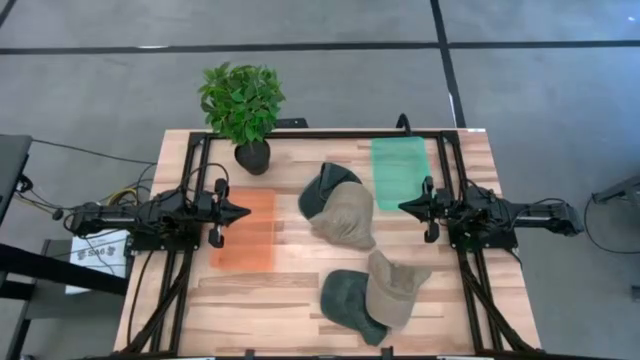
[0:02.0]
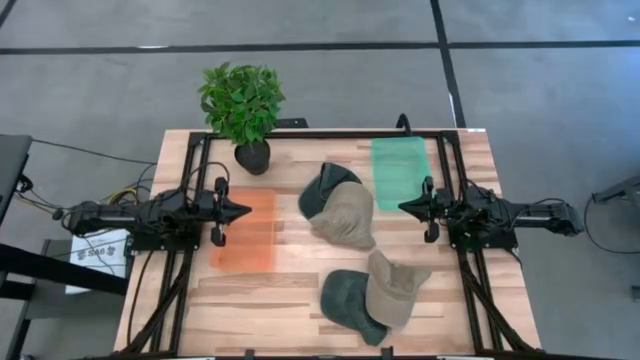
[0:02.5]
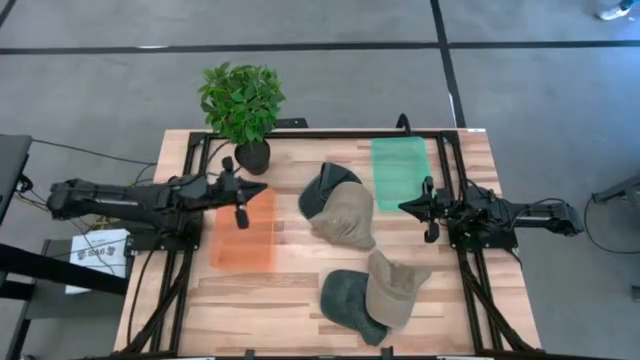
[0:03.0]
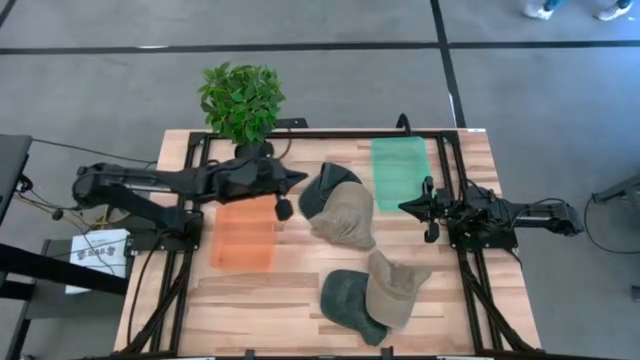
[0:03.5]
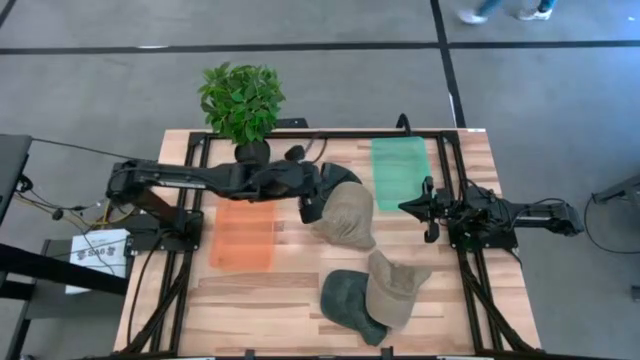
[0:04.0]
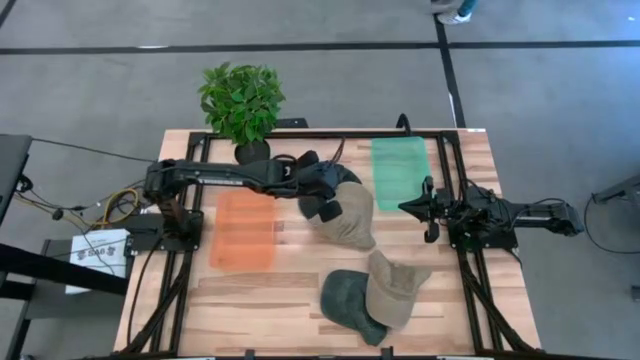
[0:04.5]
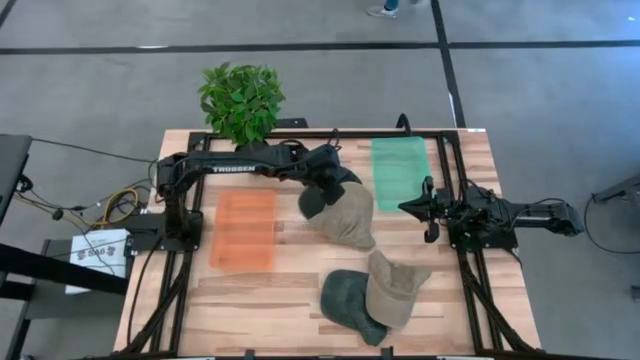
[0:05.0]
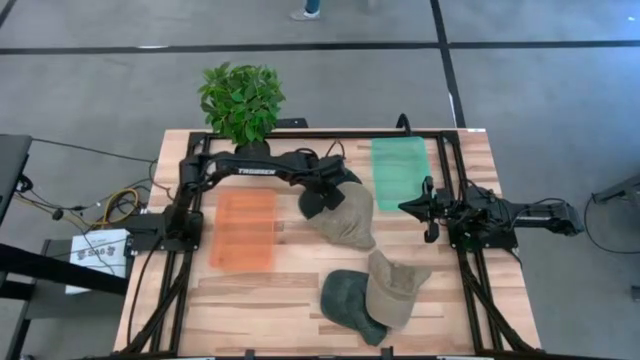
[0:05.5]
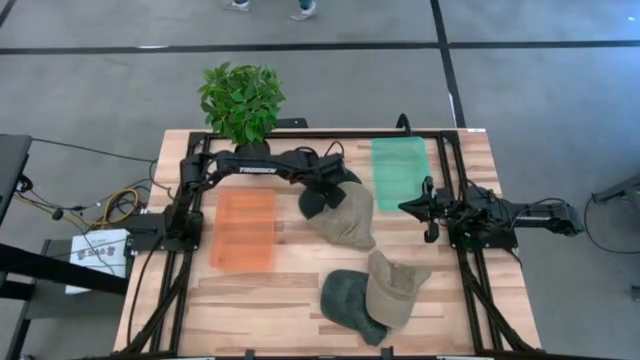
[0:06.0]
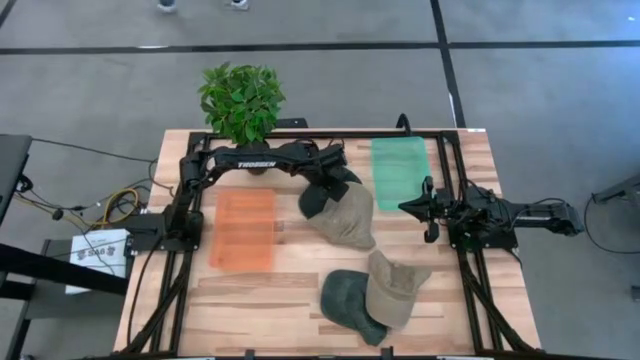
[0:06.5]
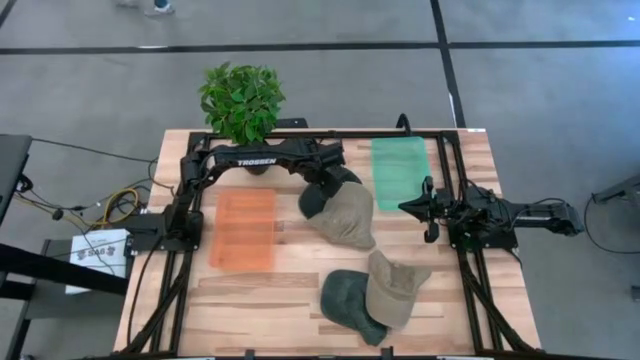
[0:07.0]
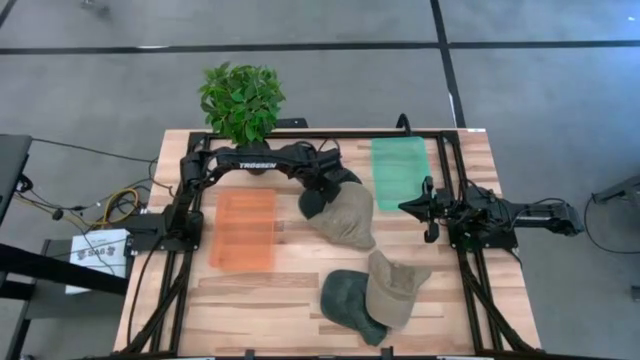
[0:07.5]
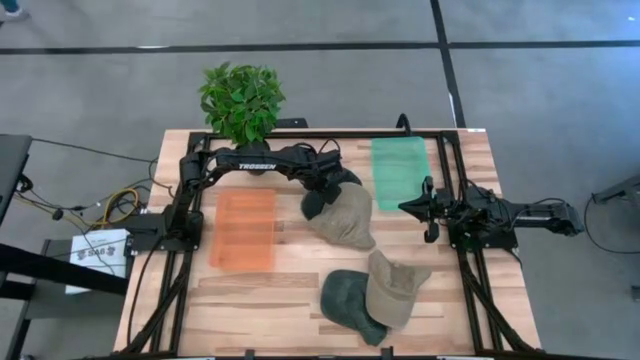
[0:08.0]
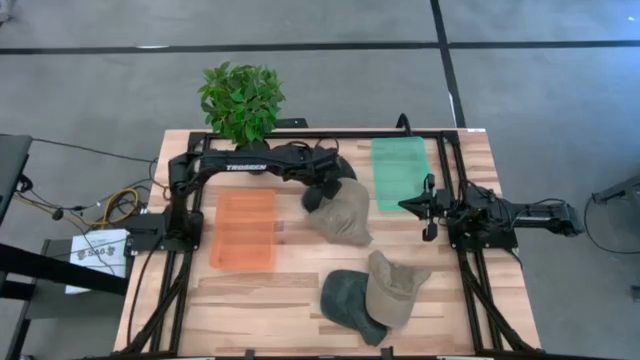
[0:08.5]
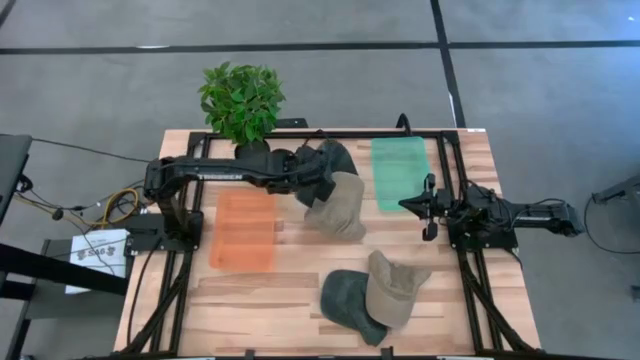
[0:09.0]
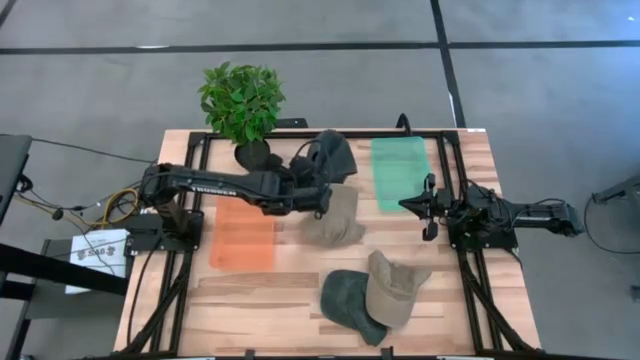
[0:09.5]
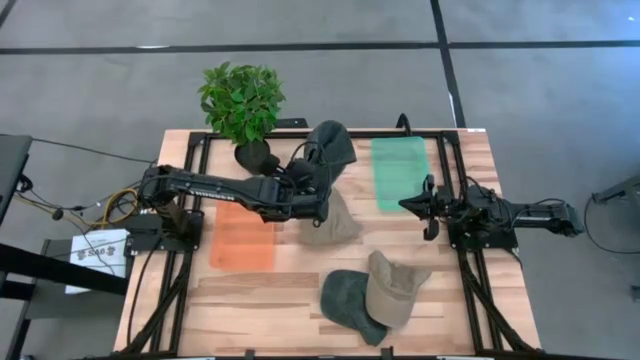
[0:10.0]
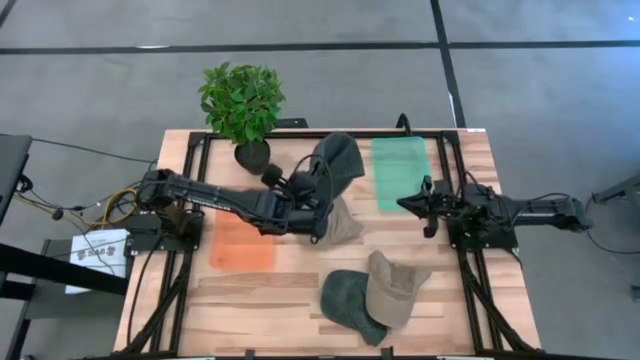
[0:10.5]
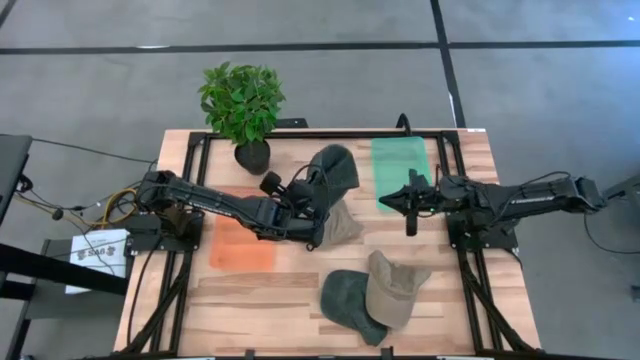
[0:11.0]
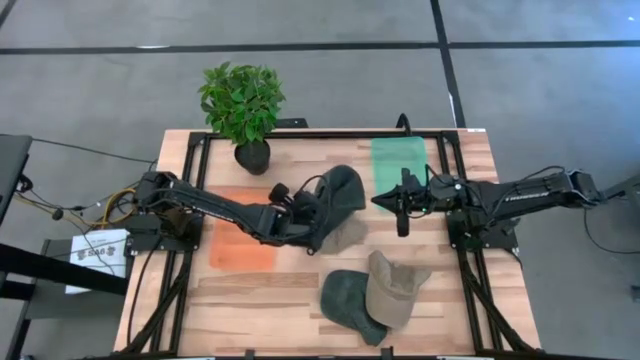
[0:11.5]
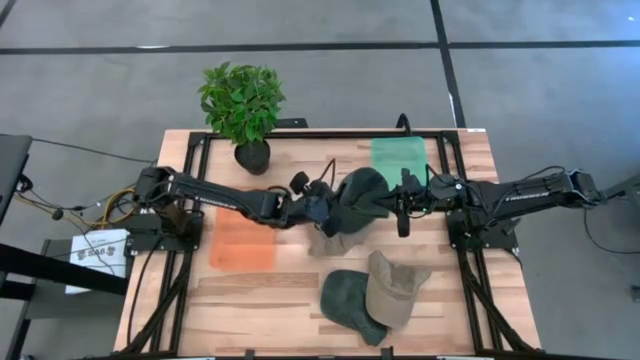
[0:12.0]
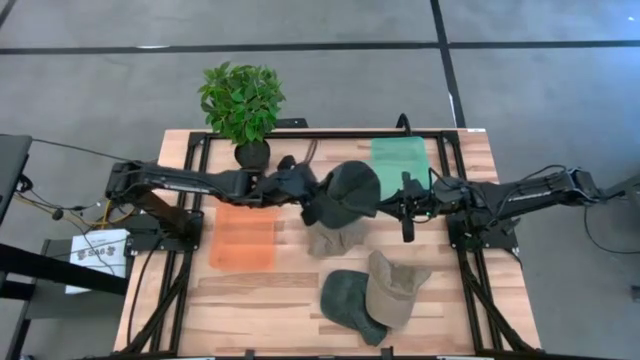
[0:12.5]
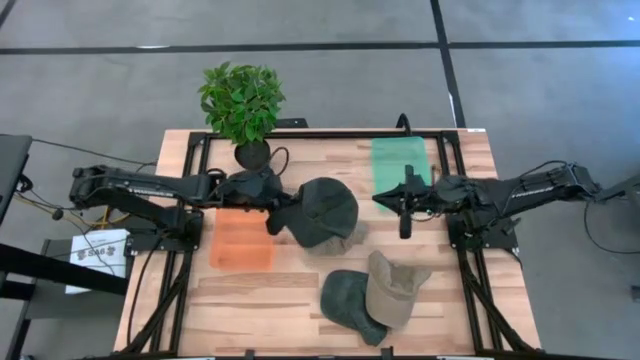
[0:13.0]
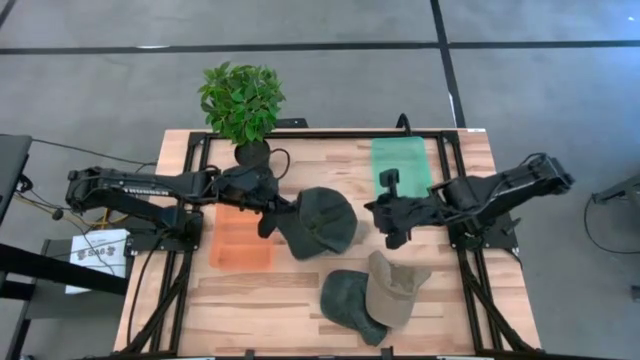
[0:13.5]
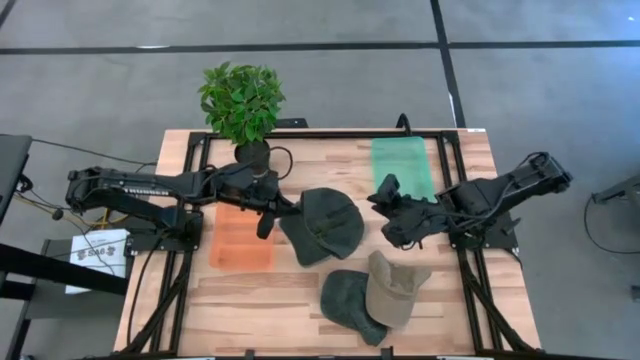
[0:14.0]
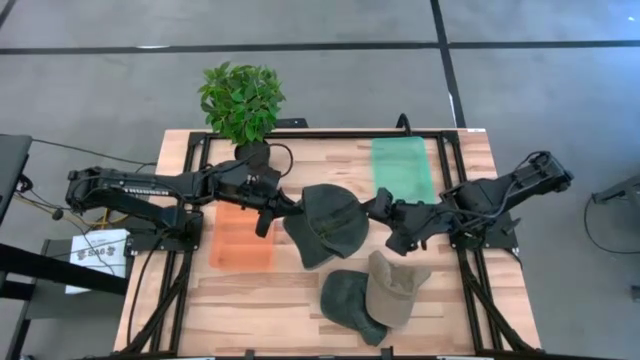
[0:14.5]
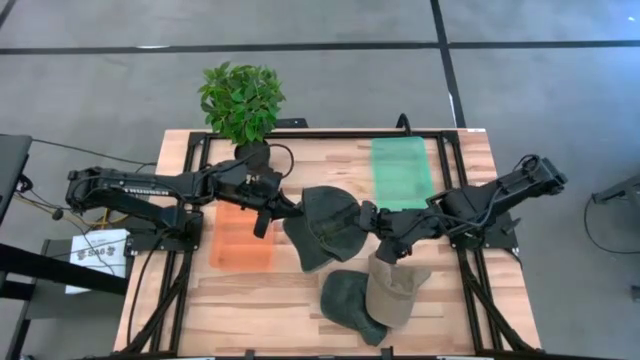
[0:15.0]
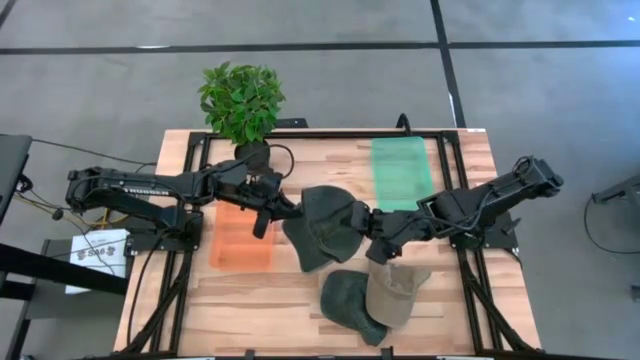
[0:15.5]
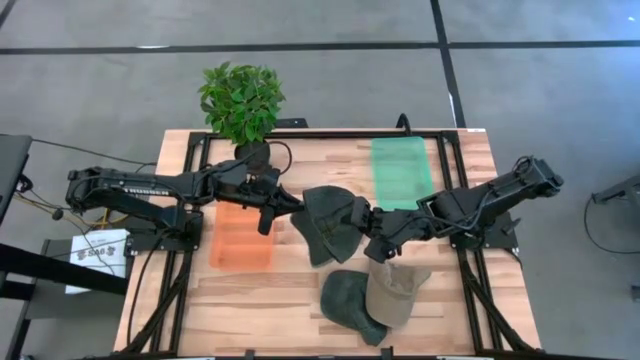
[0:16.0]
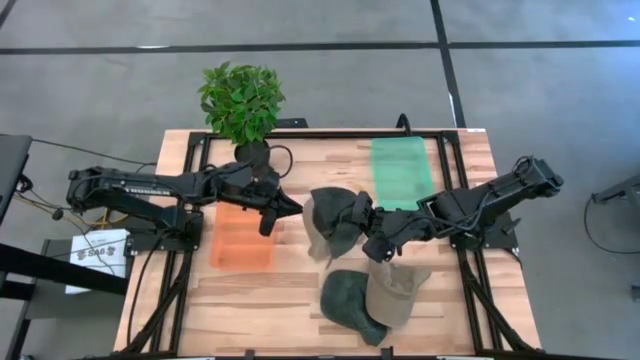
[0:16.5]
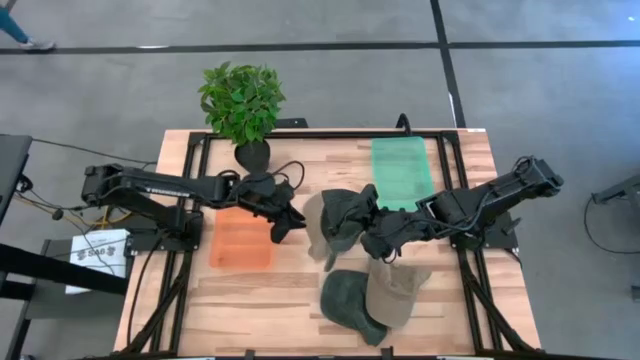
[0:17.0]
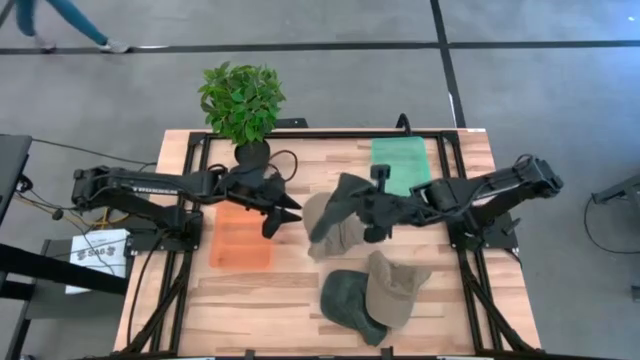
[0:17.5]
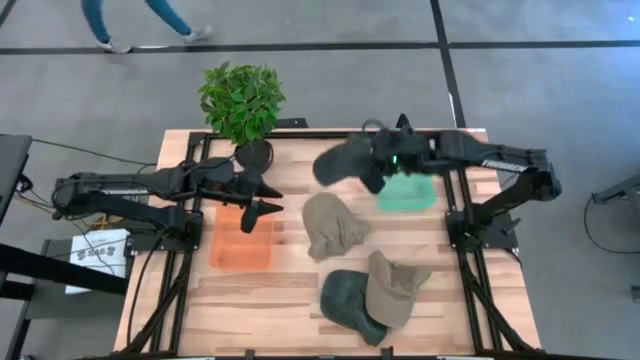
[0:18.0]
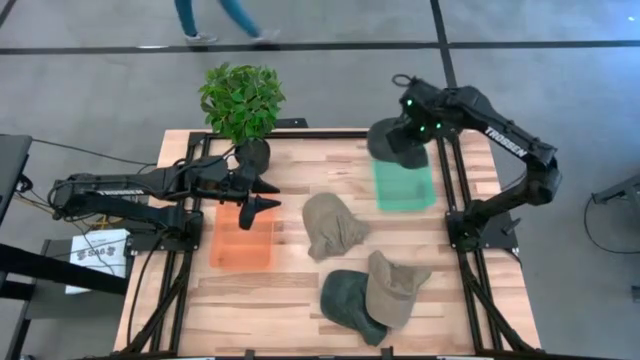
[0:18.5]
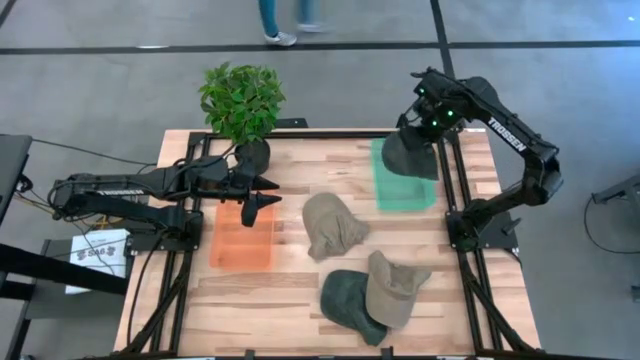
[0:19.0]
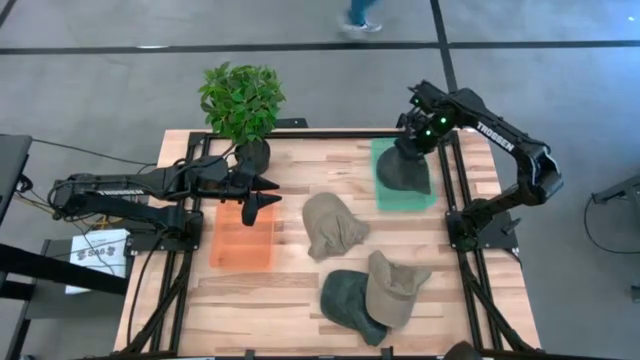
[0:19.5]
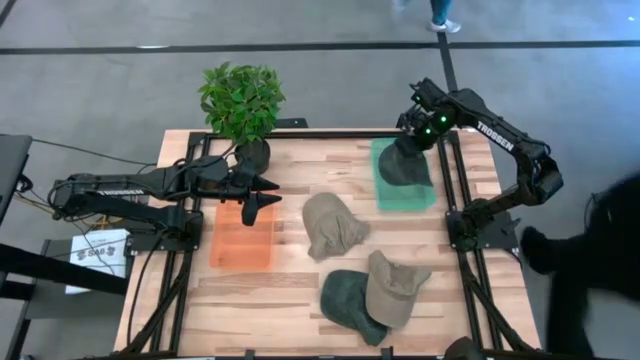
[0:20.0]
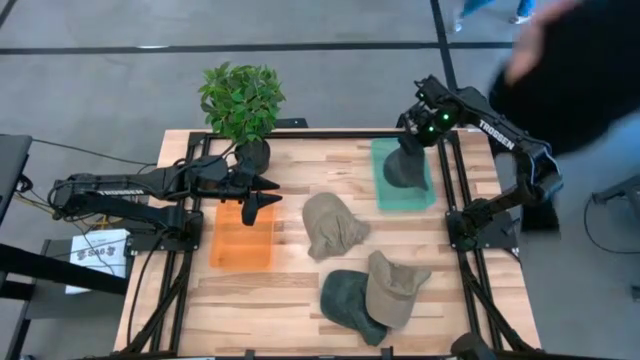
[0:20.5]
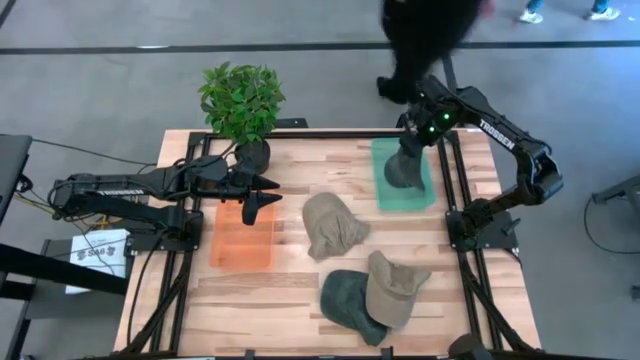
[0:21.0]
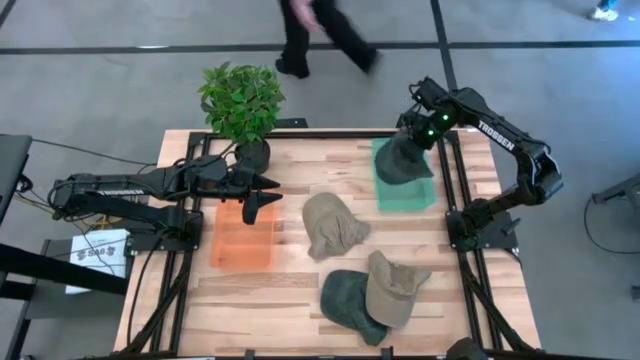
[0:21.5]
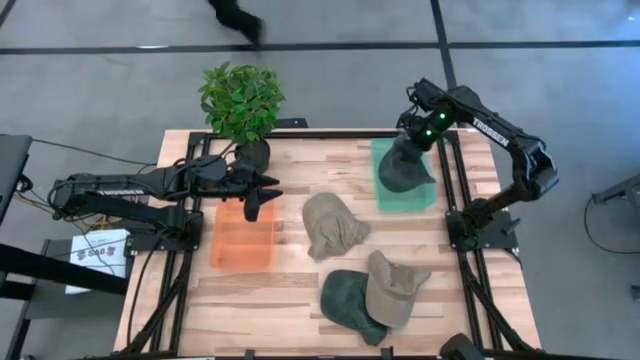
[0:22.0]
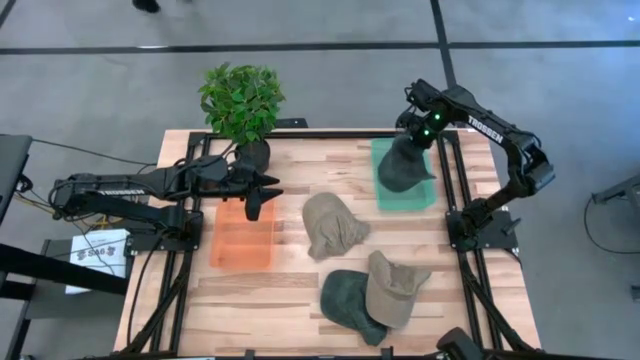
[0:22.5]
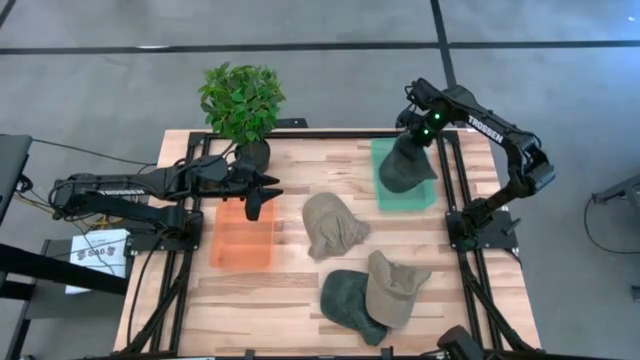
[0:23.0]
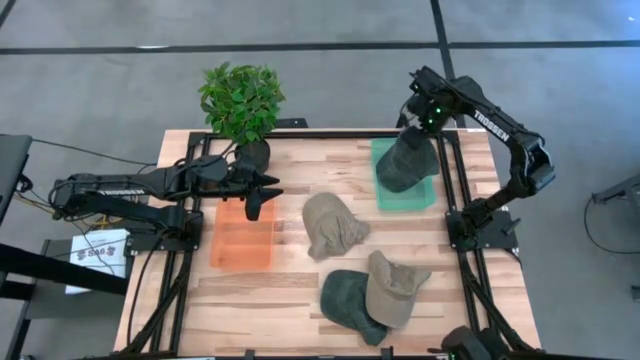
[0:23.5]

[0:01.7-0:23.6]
Task: Pick & Place hat
Put the top blue cap into the blue bin
